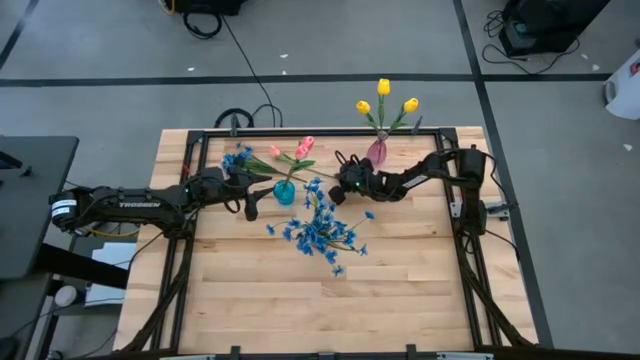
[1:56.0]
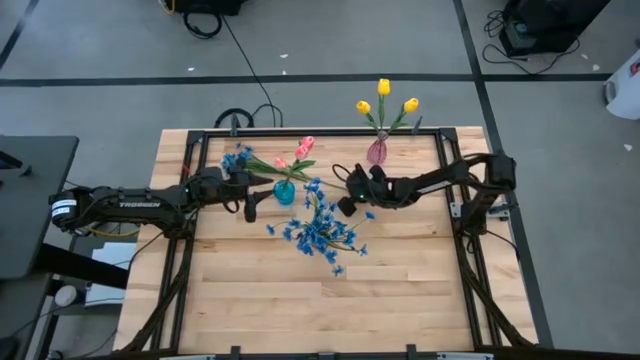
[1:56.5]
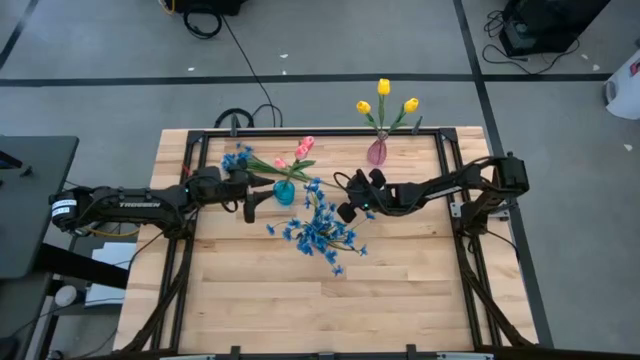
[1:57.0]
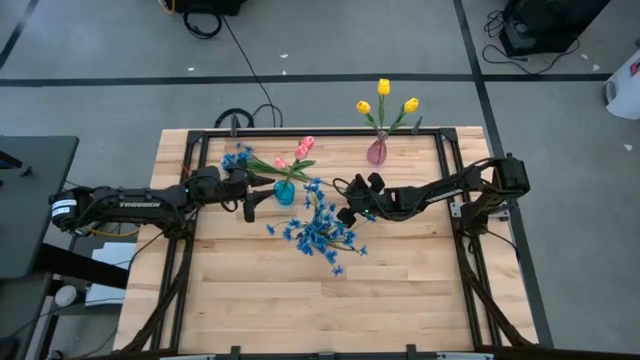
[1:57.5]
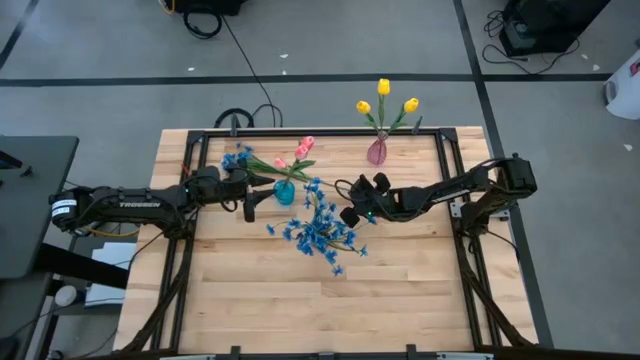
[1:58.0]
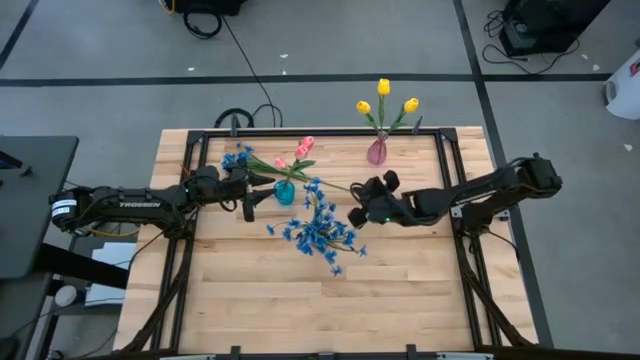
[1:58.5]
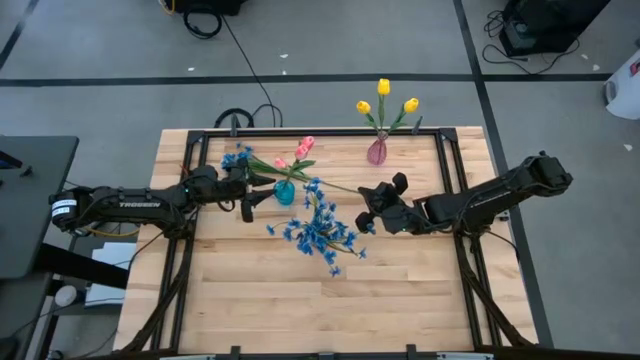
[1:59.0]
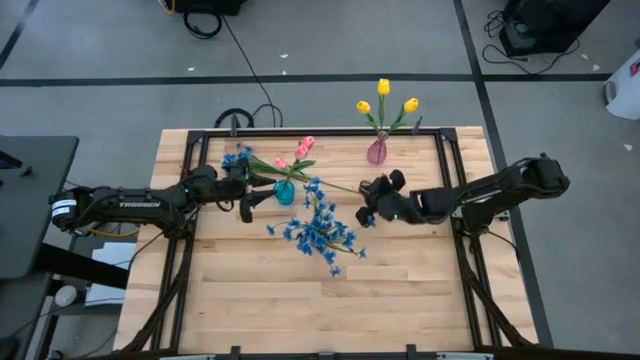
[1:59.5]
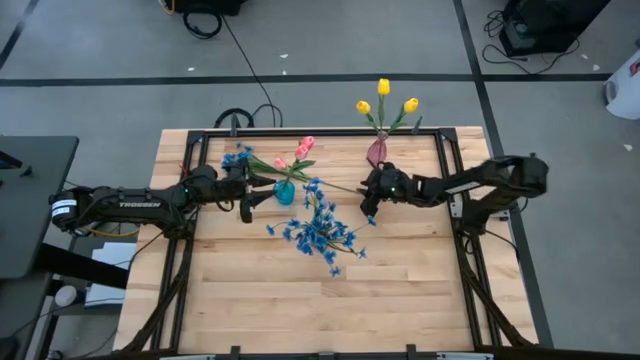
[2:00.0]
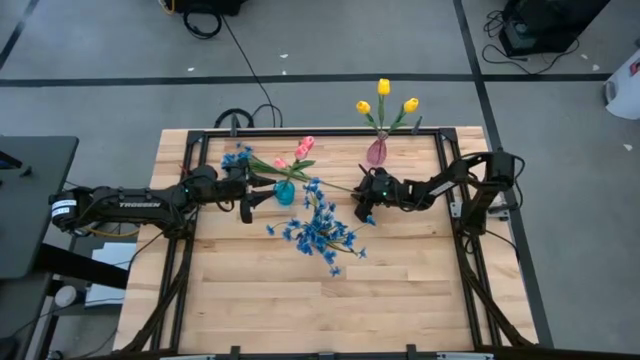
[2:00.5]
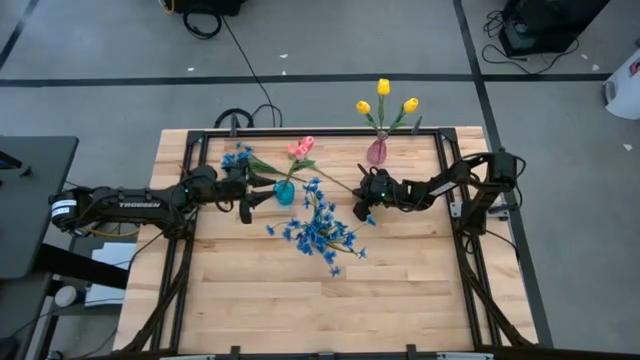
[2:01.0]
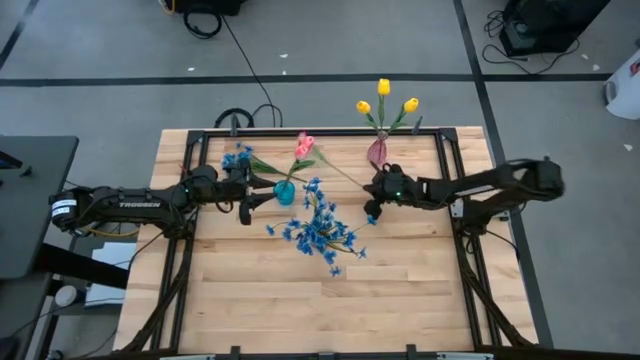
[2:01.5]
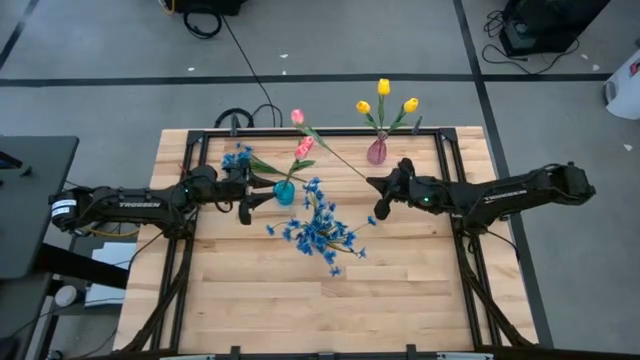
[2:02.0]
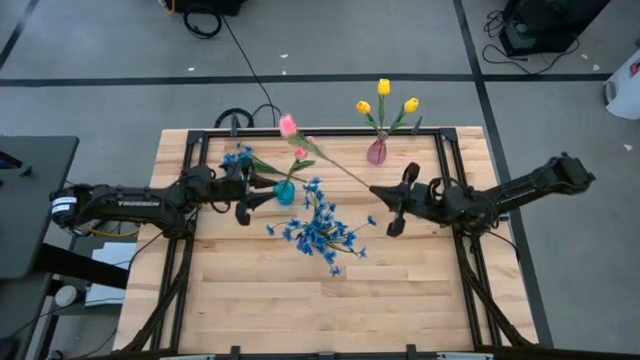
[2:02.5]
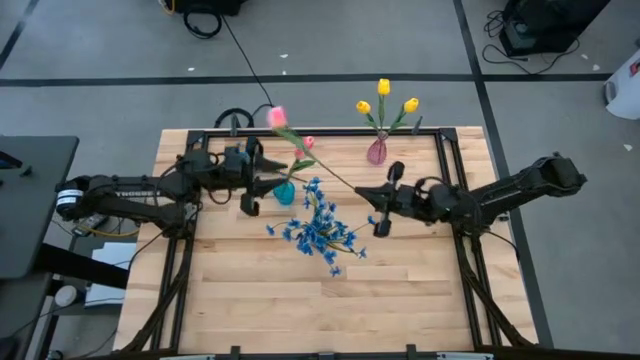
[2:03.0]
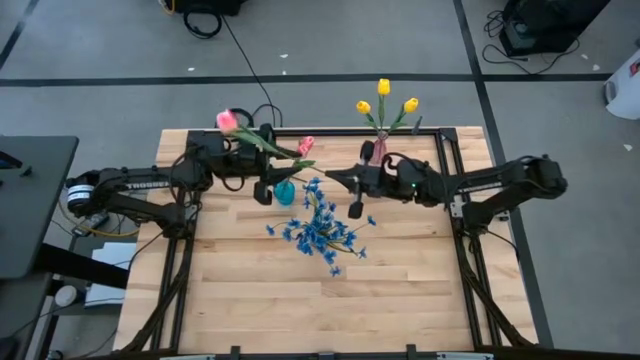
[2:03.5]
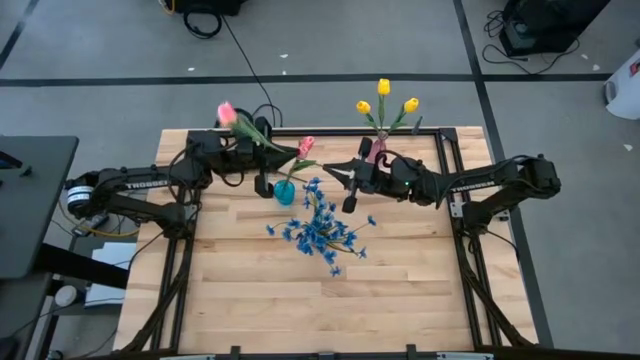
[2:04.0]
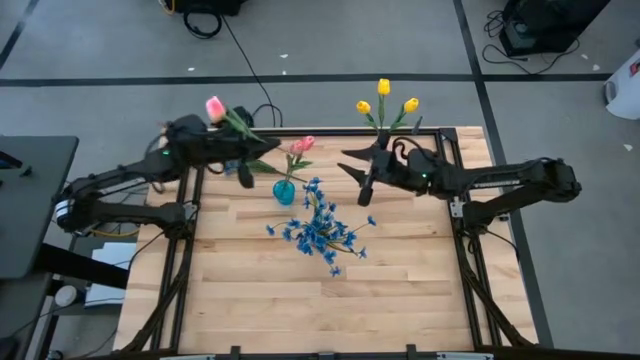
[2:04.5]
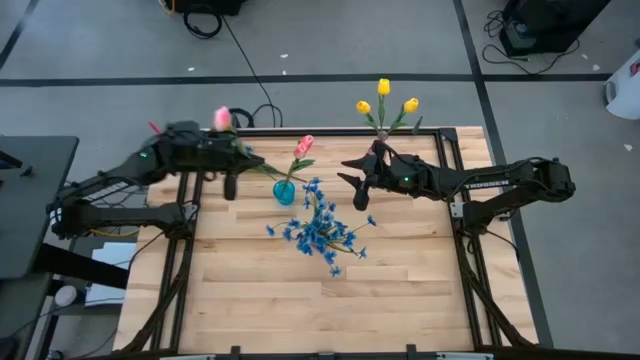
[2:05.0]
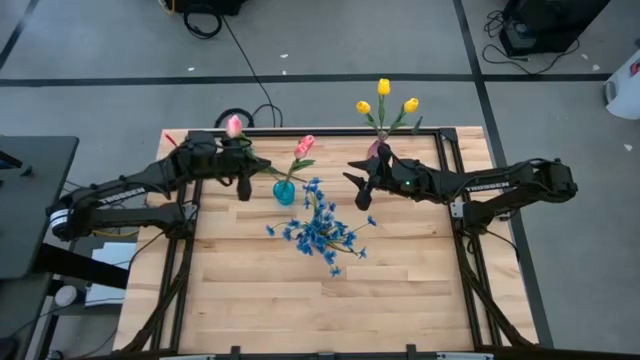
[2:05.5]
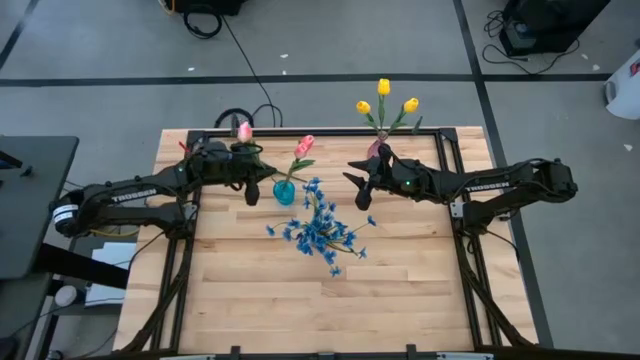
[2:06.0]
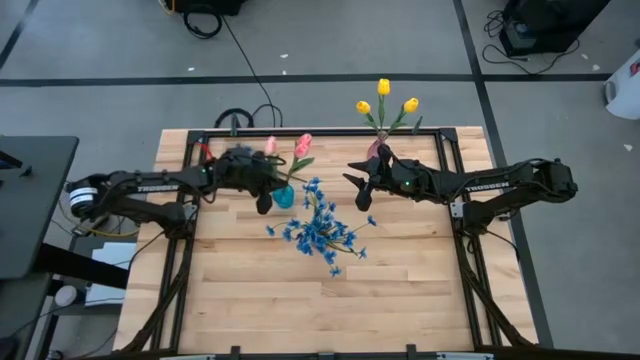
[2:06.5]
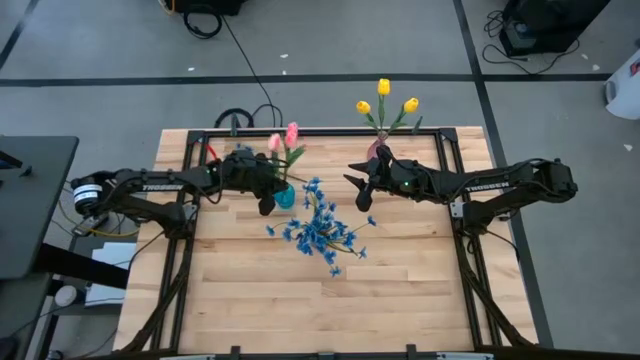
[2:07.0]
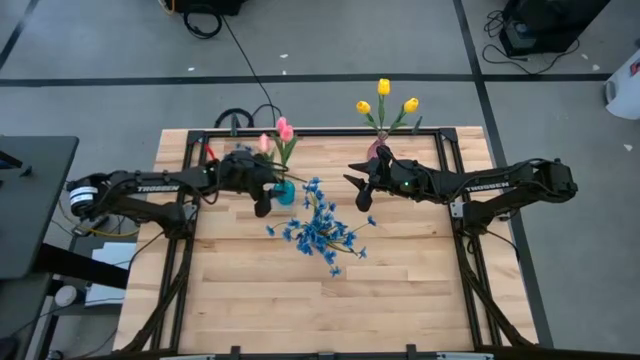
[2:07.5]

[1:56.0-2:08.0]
Task: Sort flowers into vase by color
Put the pink flower into the blue vase

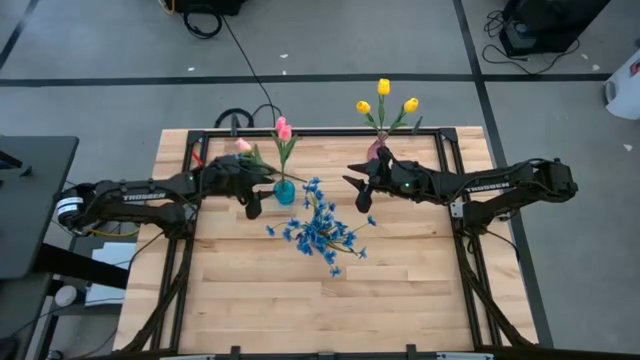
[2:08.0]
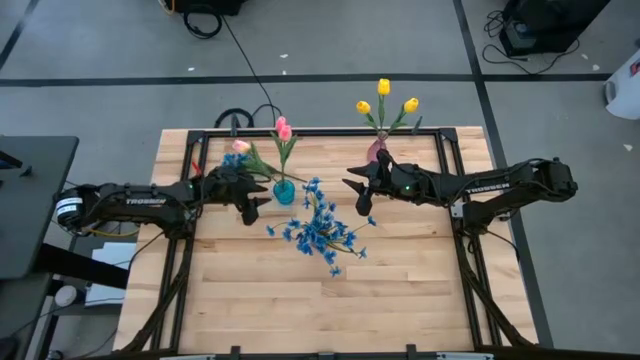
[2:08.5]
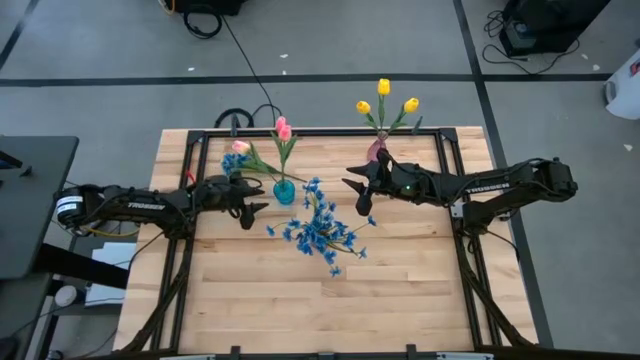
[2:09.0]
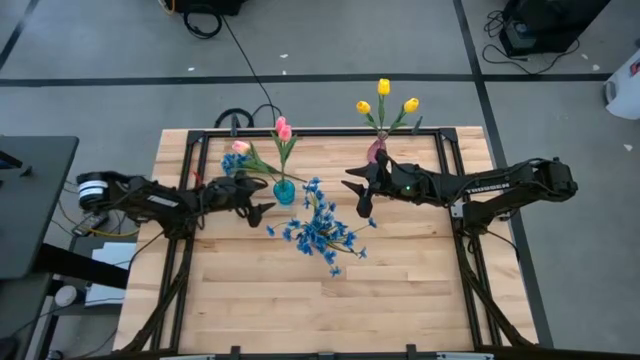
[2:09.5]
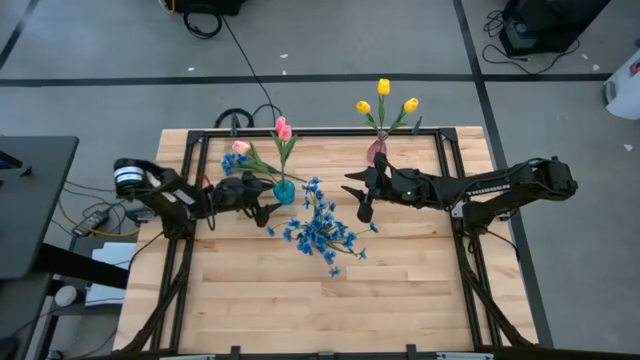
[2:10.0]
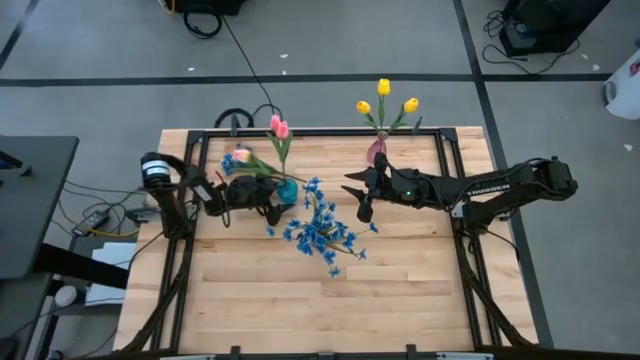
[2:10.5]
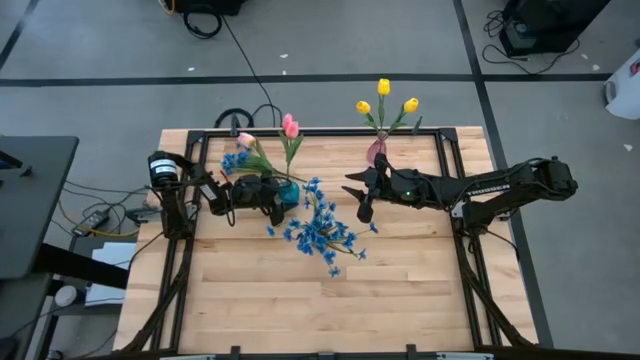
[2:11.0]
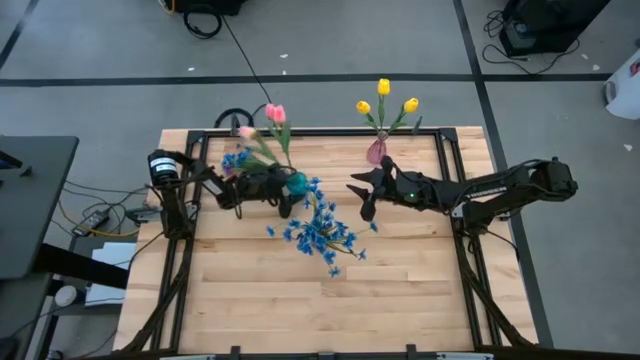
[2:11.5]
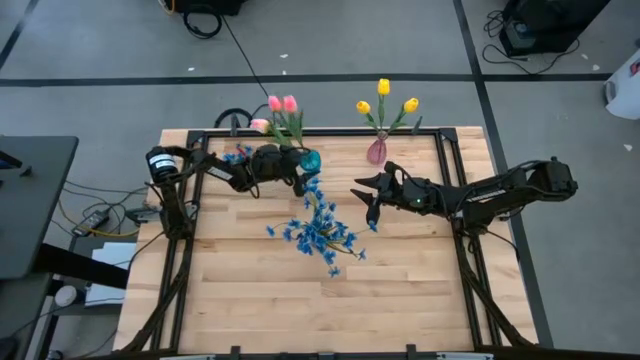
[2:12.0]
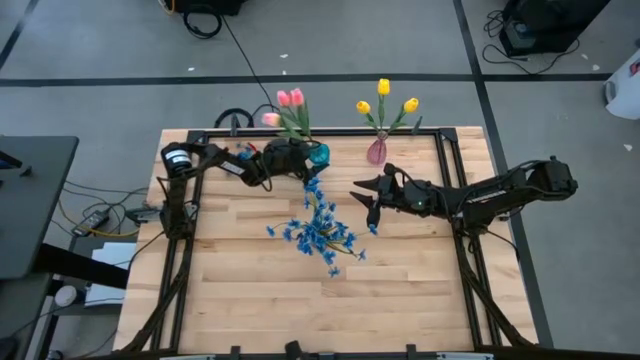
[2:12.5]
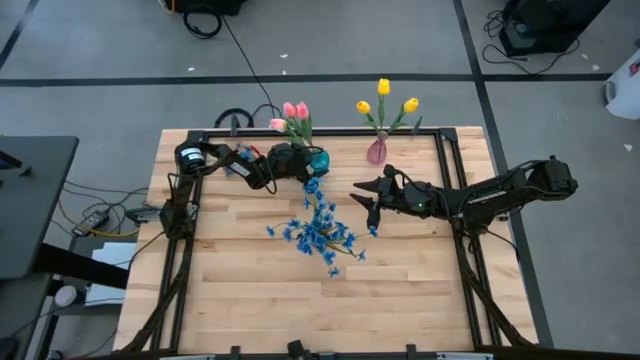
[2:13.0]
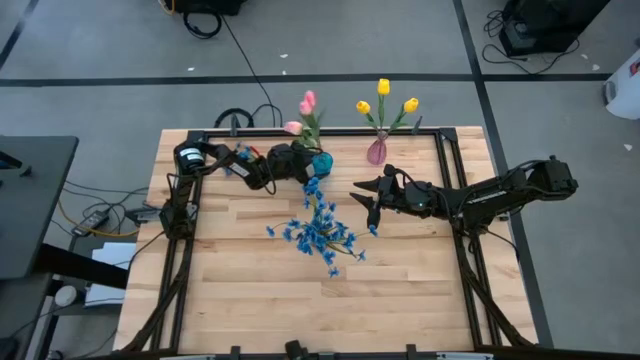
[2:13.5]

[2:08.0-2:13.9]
Move the blue vase to the middle top of the table

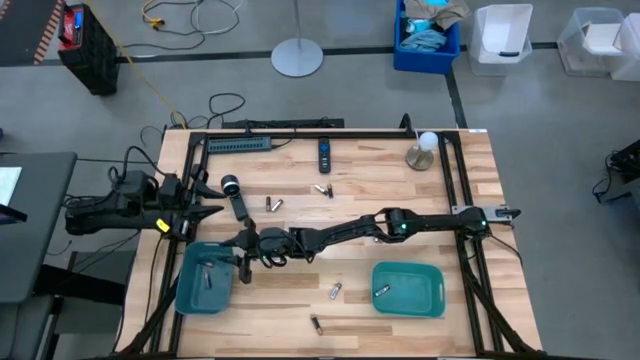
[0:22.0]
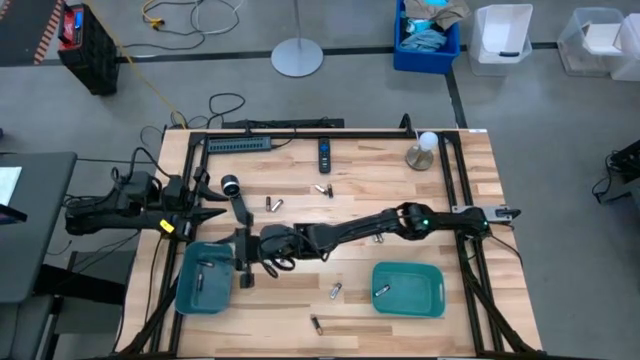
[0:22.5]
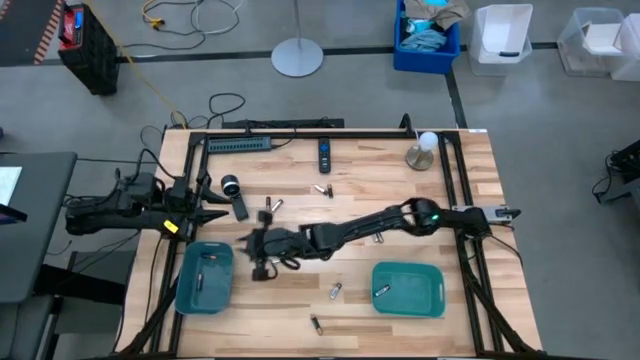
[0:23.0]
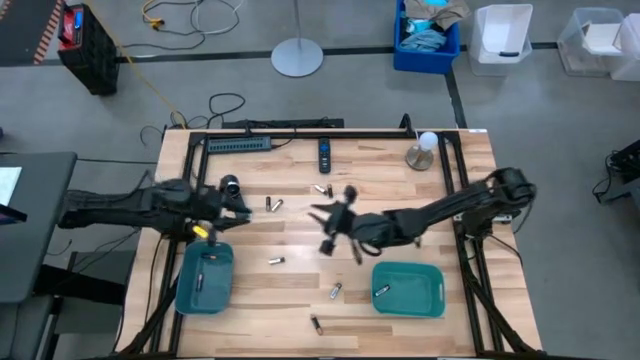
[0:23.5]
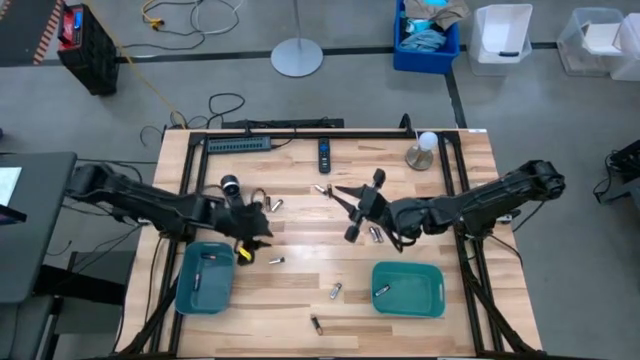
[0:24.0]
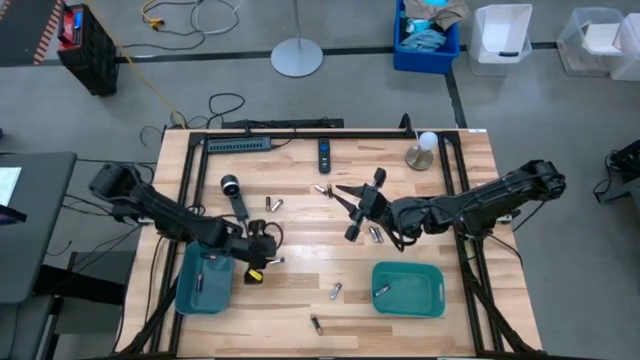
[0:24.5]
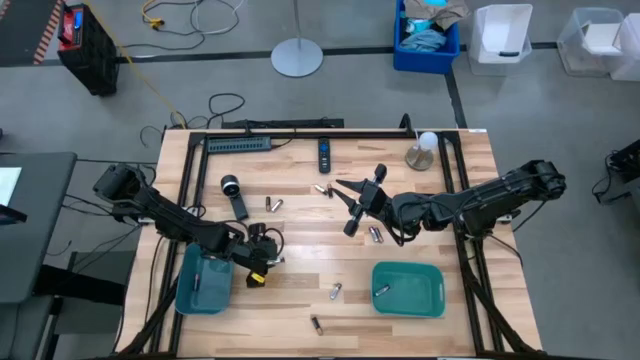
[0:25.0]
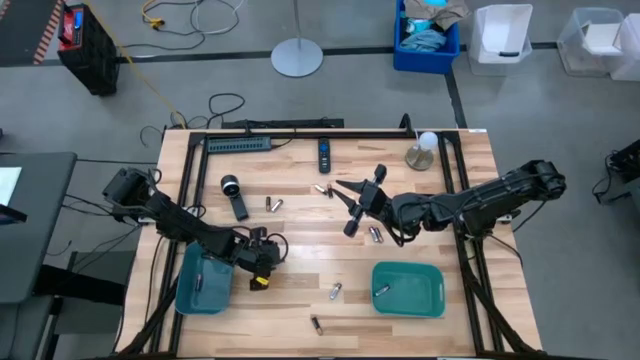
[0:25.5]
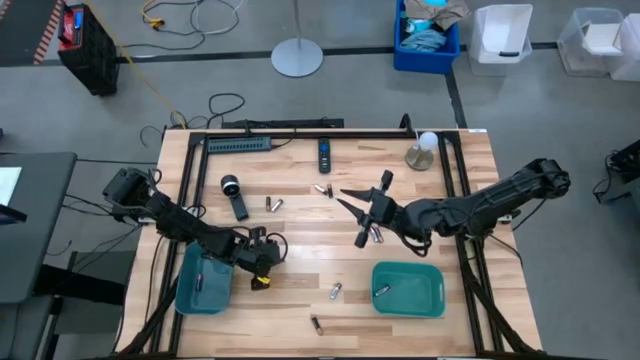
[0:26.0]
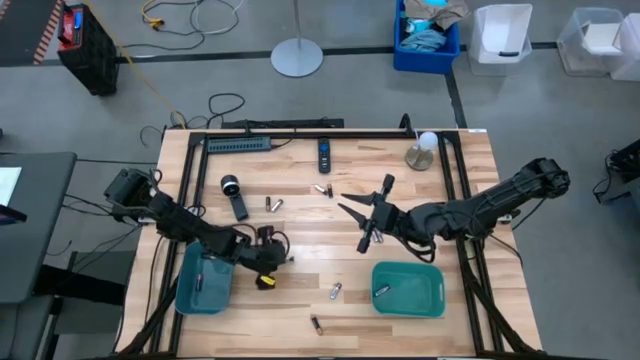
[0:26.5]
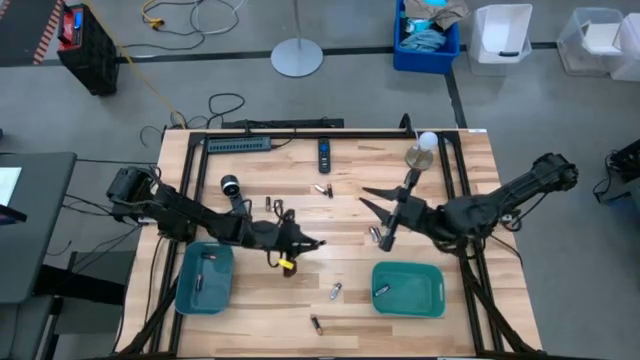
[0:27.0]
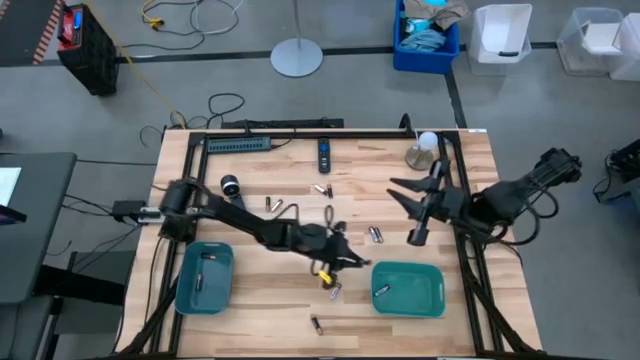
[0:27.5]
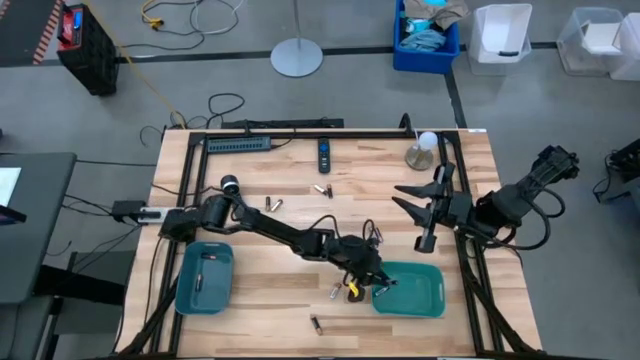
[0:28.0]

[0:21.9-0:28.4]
Task: Sort batteries
Put the silver battery into the green bin
